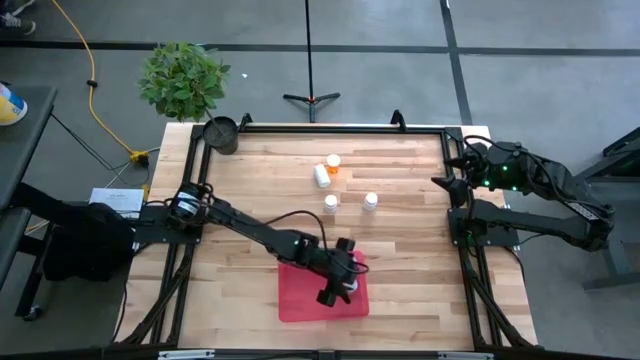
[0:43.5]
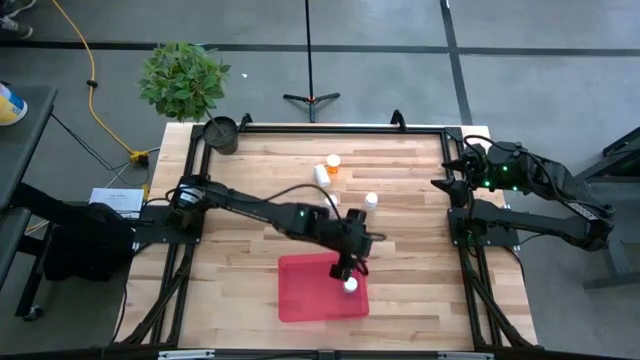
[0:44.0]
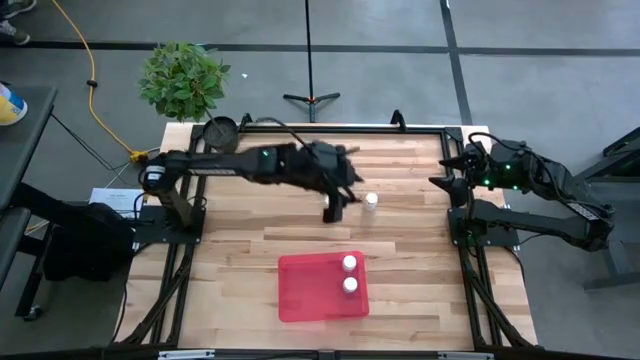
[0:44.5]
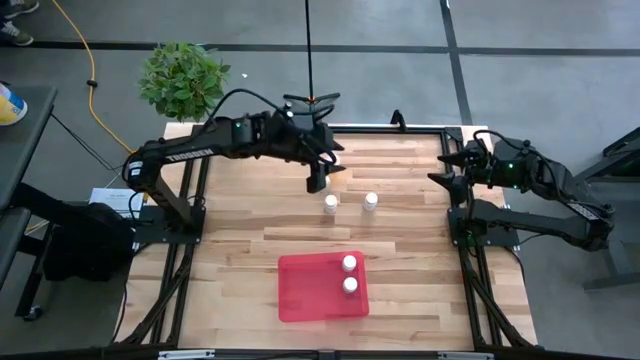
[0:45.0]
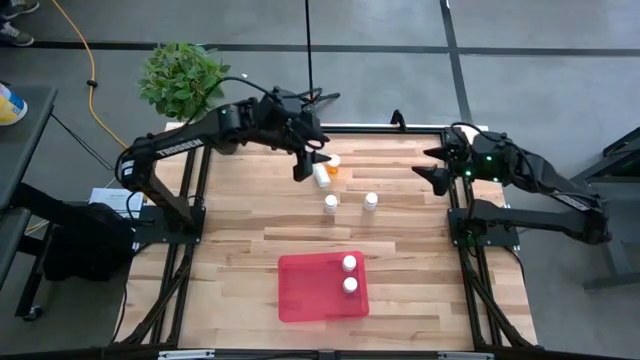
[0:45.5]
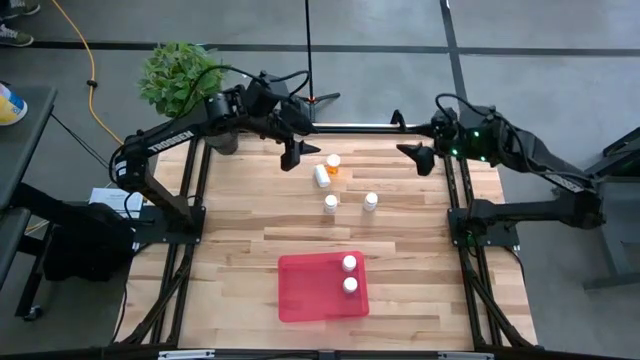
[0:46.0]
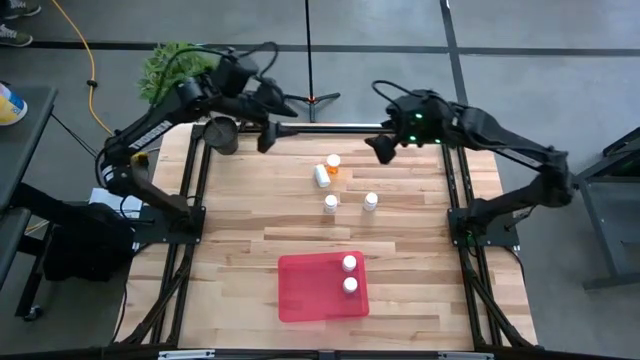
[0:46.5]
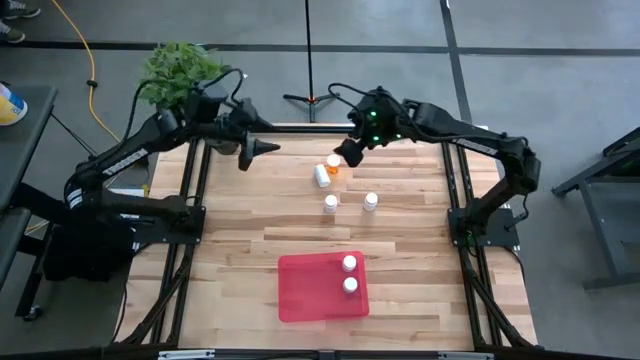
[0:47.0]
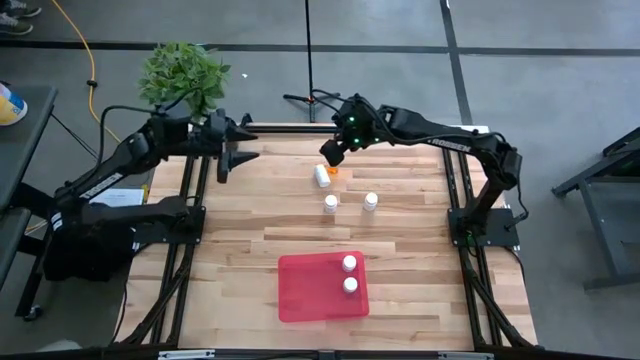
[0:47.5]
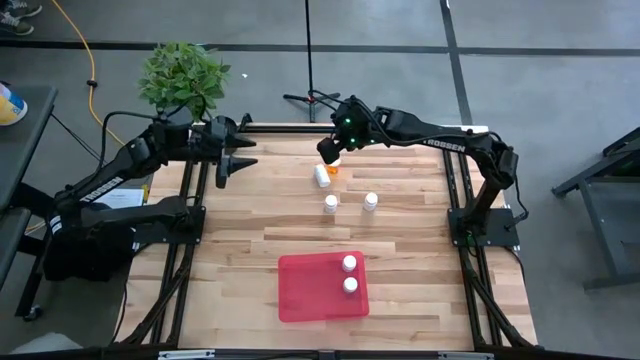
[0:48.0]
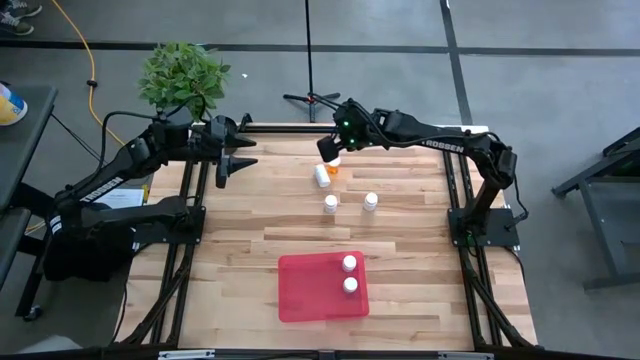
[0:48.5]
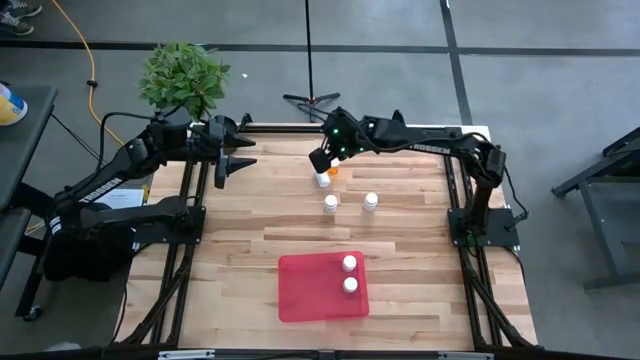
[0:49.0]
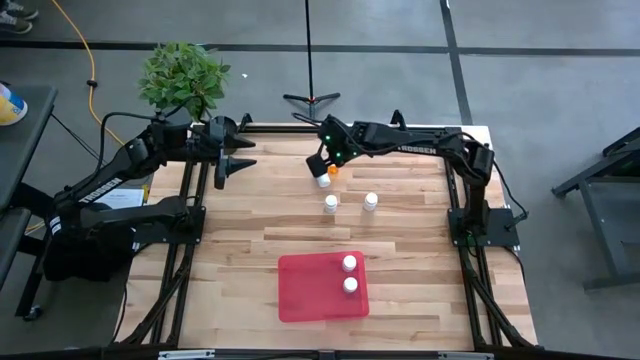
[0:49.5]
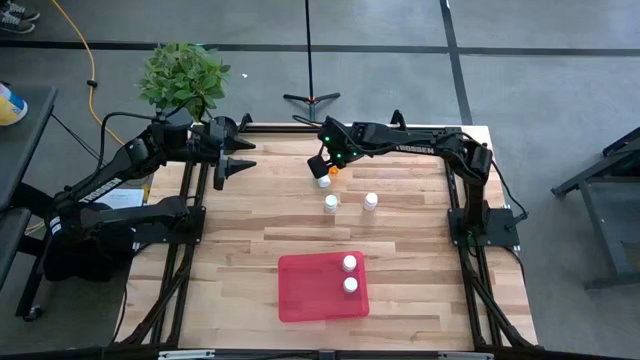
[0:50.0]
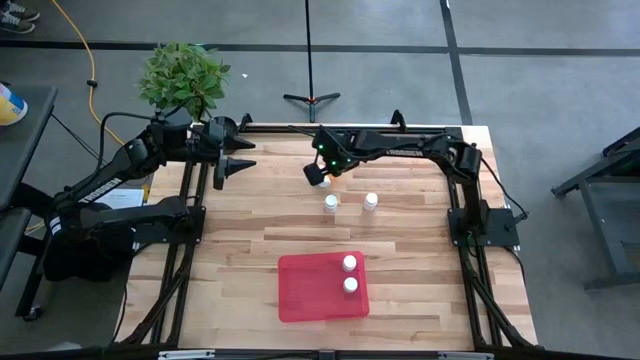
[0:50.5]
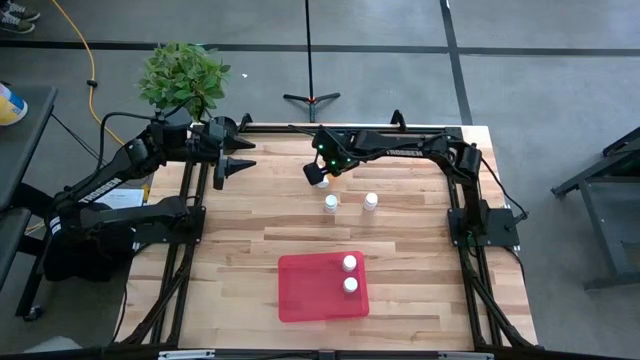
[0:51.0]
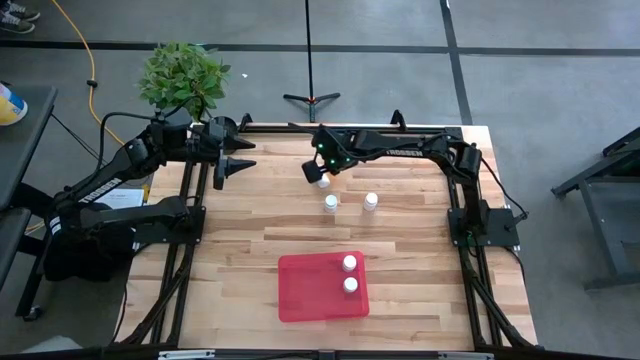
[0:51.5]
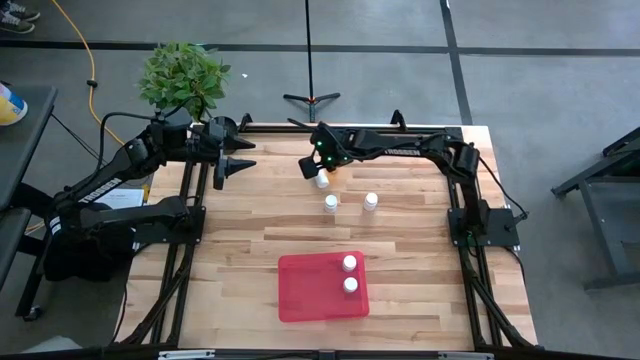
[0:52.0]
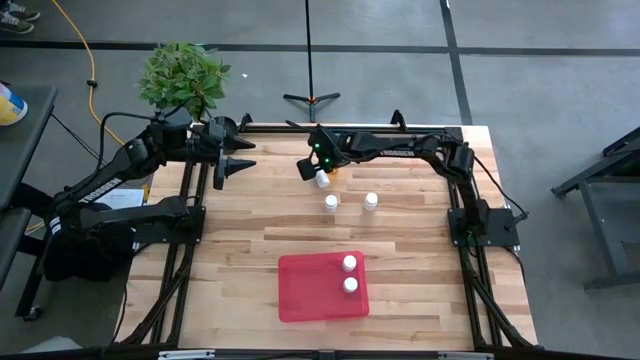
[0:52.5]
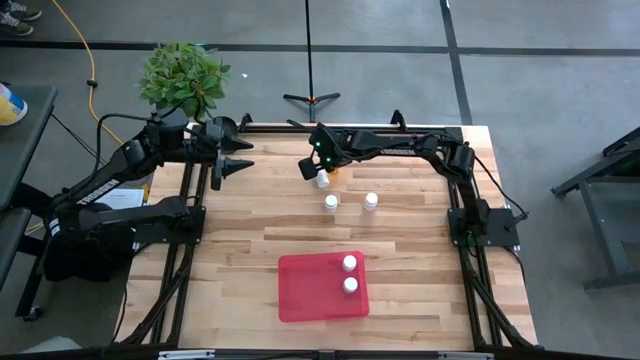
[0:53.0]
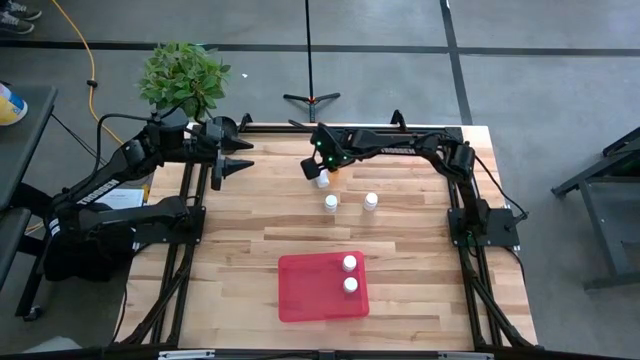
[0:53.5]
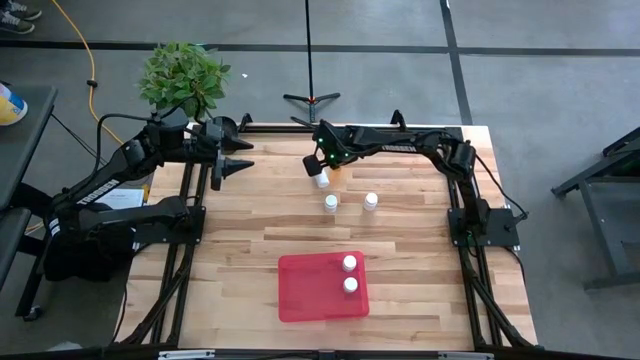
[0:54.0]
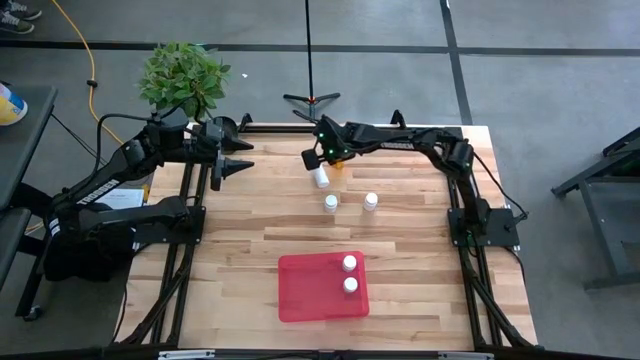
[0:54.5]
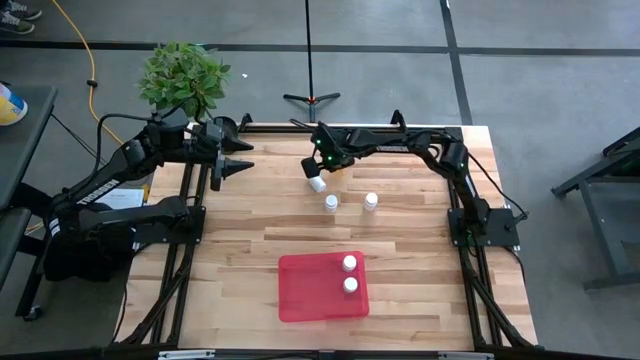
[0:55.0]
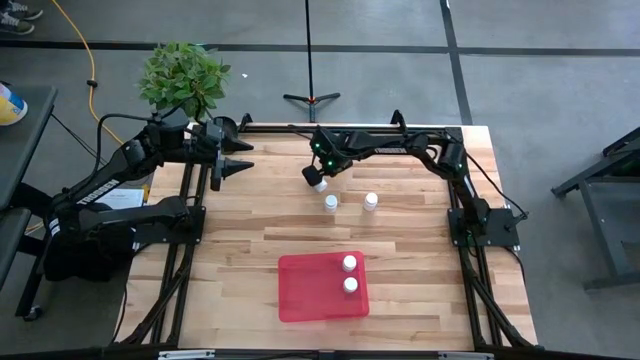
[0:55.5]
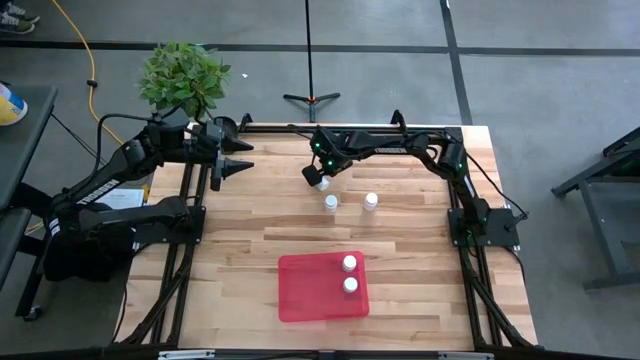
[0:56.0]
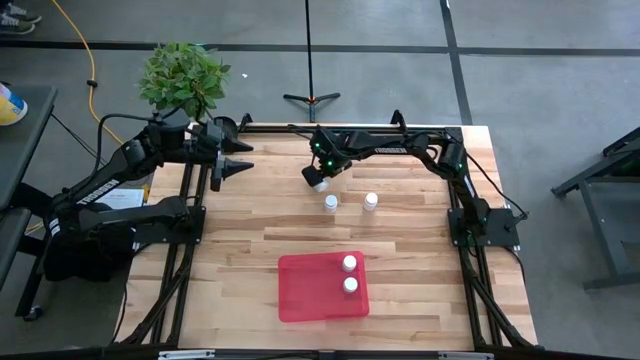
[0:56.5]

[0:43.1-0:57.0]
Task: Pick and place pill bottles into a basket
Put the white medicine bottle into the red container

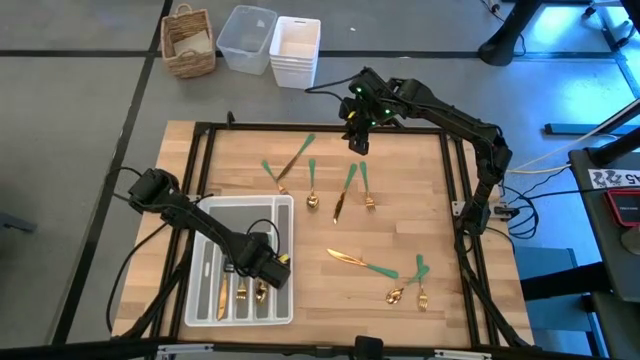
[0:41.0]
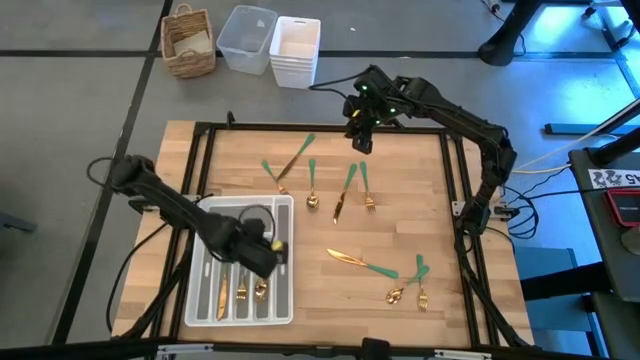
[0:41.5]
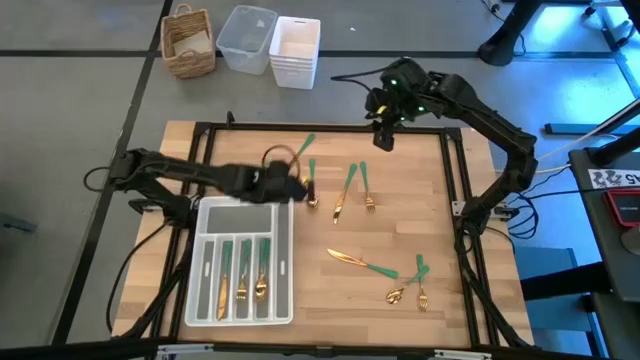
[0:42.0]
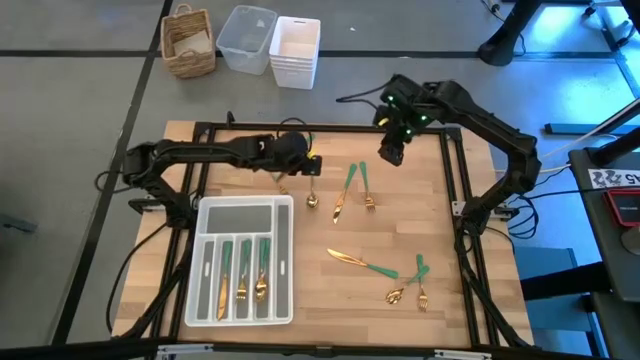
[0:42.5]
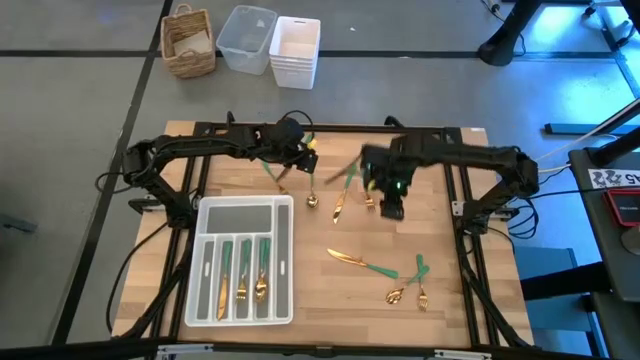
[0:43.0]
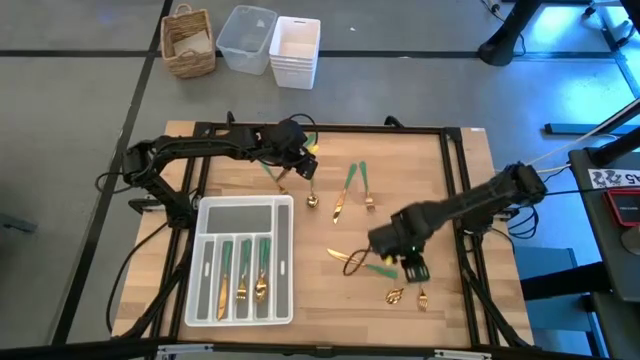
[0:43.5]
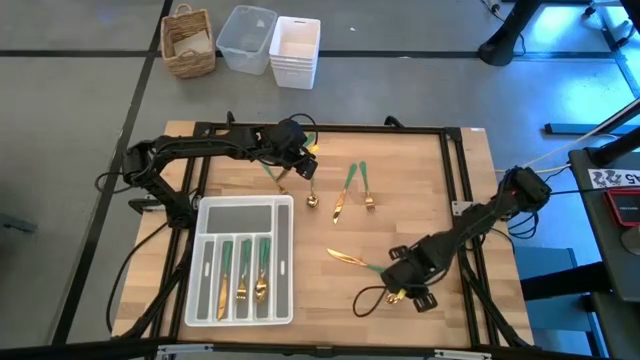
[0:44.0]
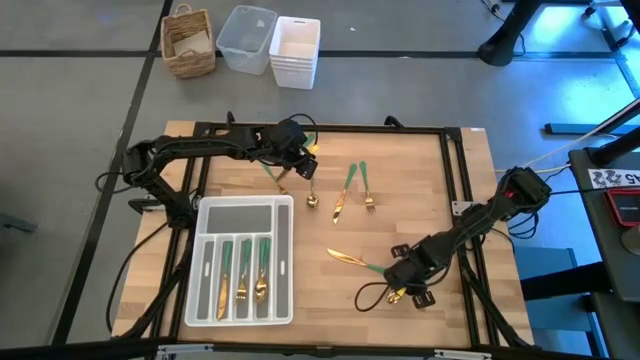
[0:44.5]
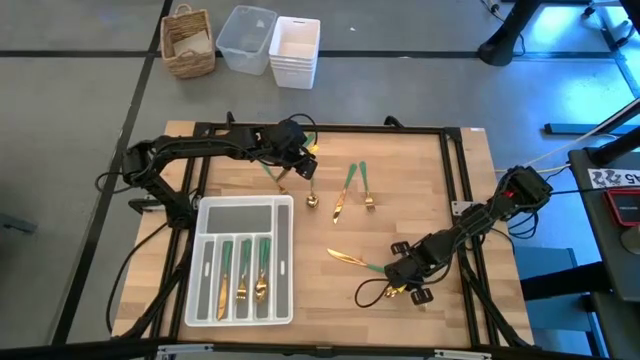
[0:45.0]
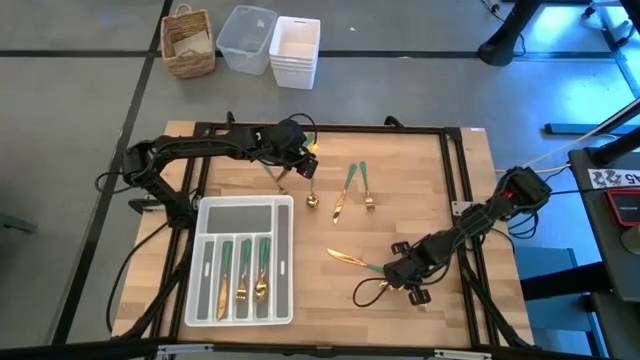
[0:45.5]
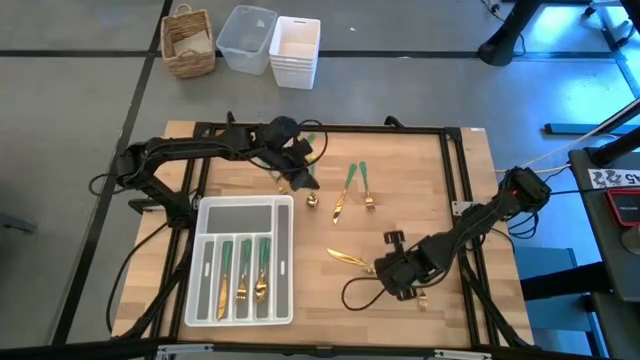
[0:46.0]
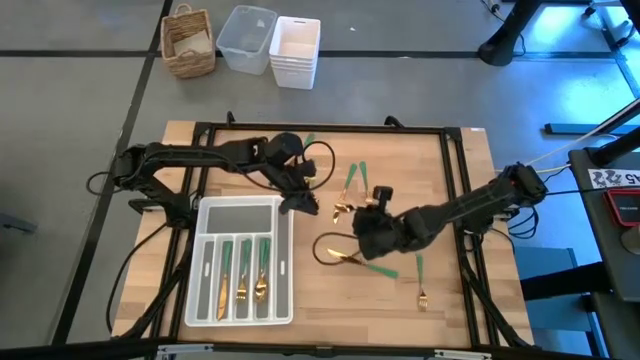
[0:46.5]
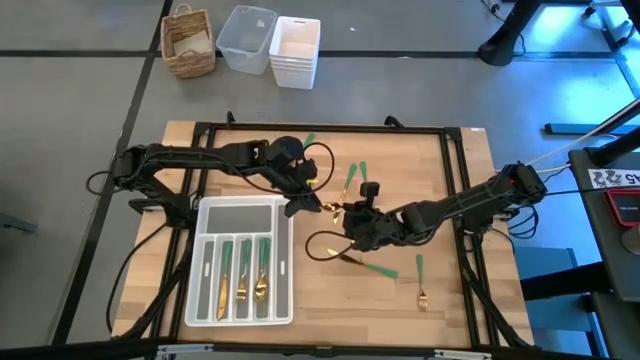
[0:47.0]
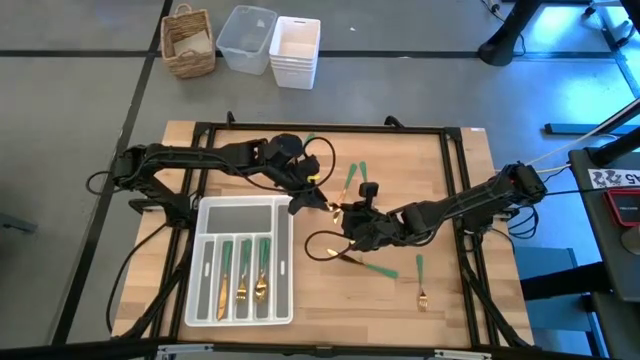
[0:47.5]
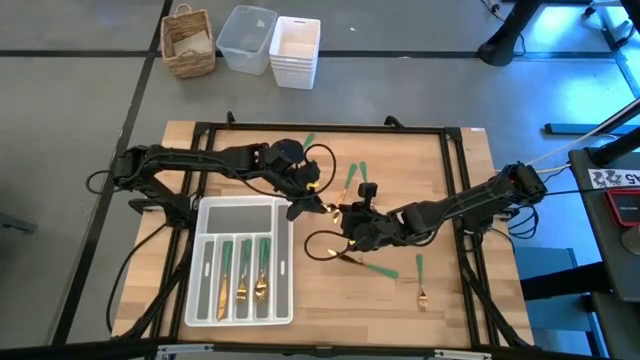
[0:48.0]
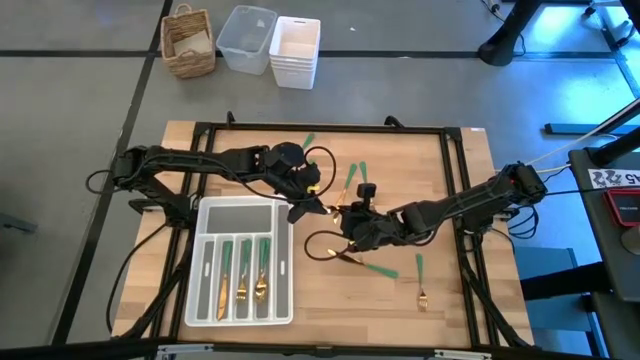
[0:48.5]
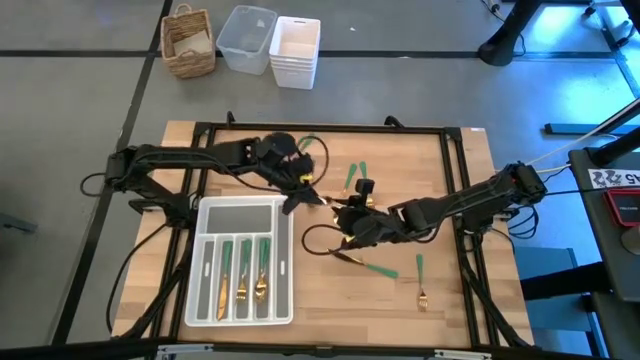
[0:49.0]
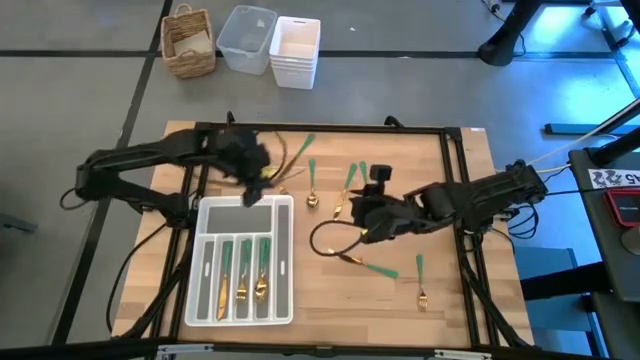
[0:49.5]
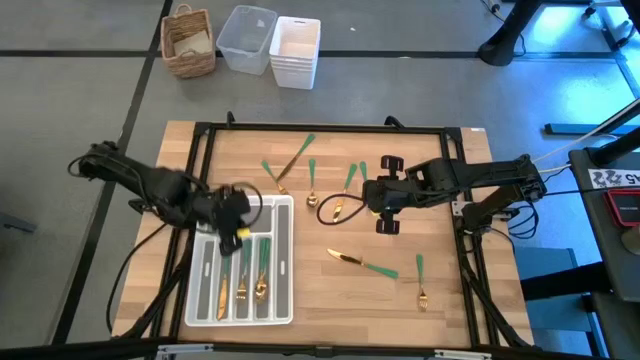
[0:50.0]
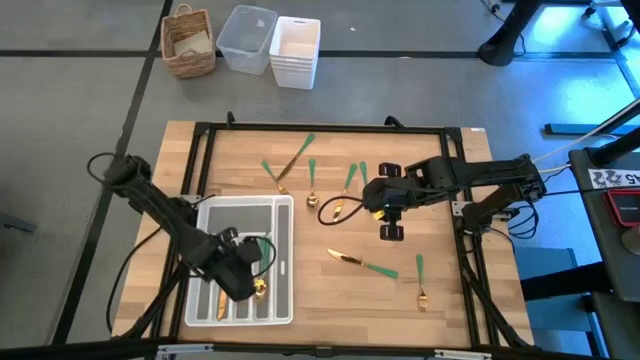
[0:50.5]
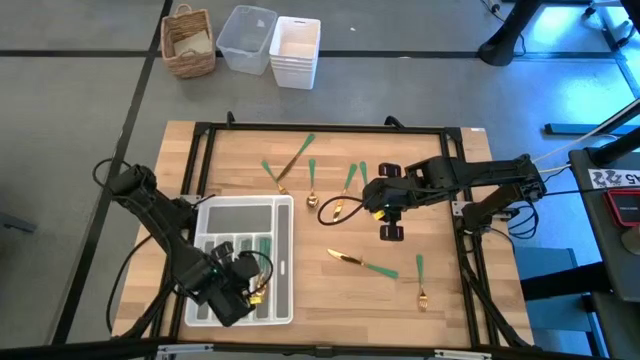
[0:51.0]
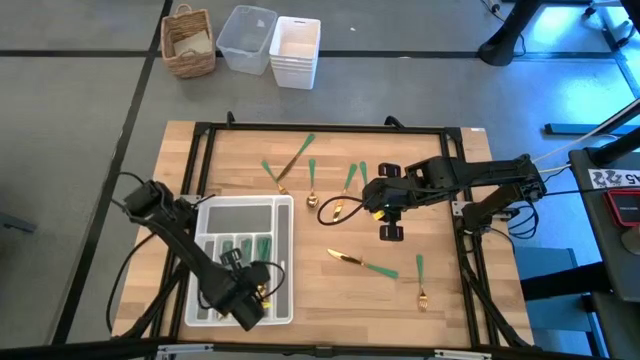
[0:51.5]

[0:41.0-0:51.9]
Task: Sort silverware
Put the green spoon on the silverware tray
